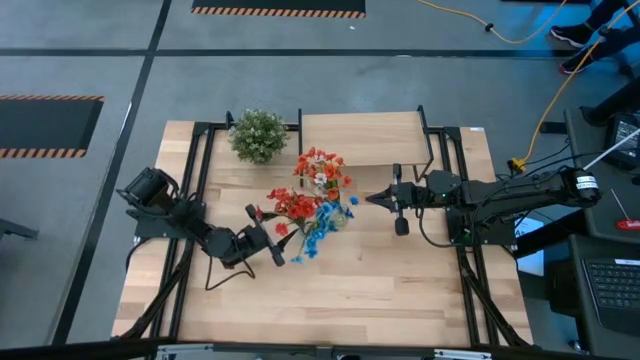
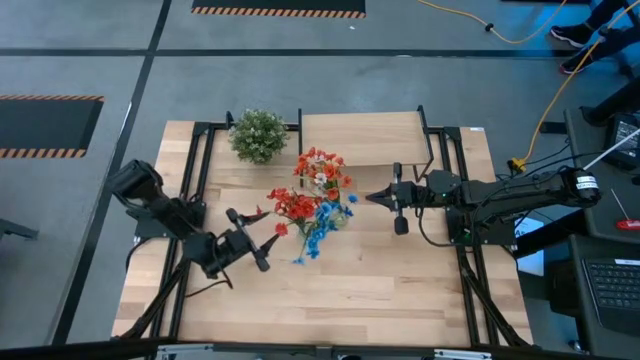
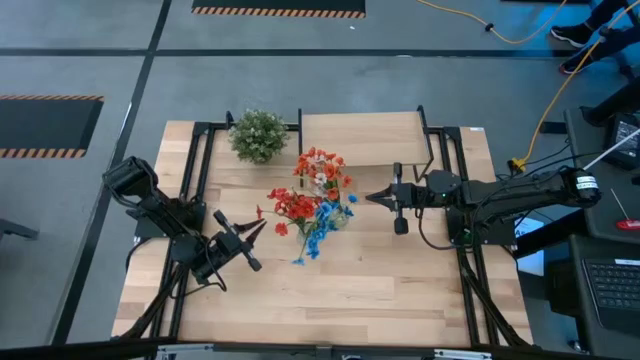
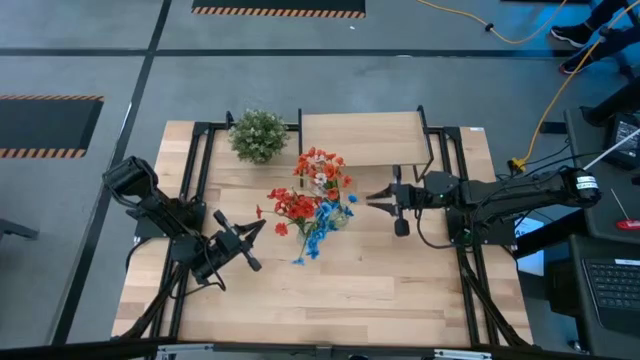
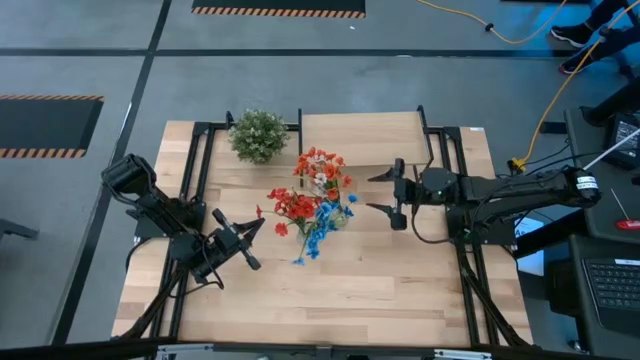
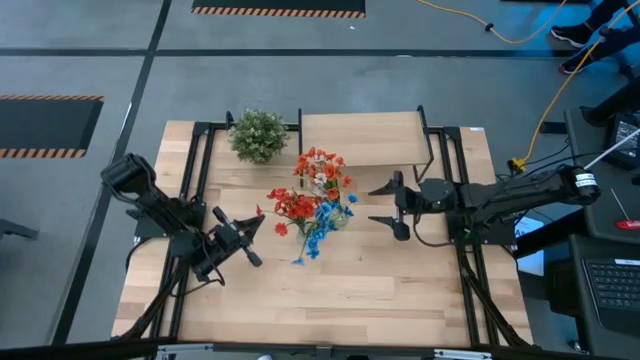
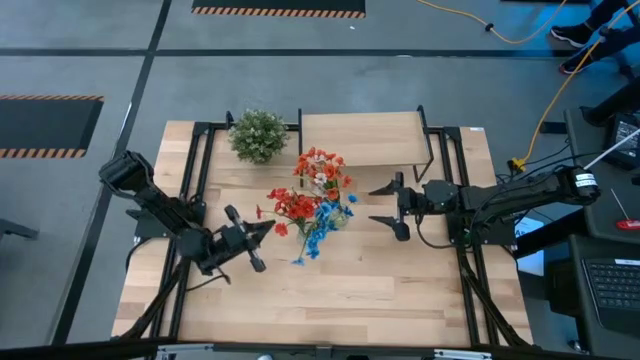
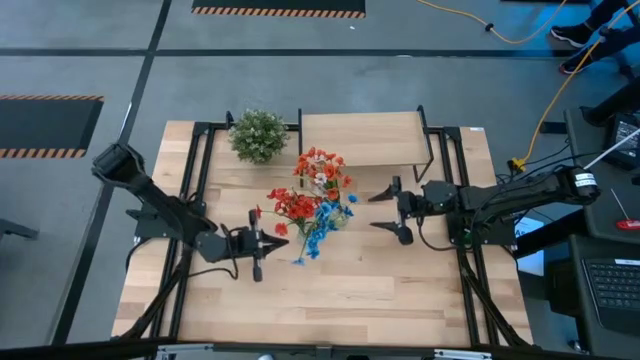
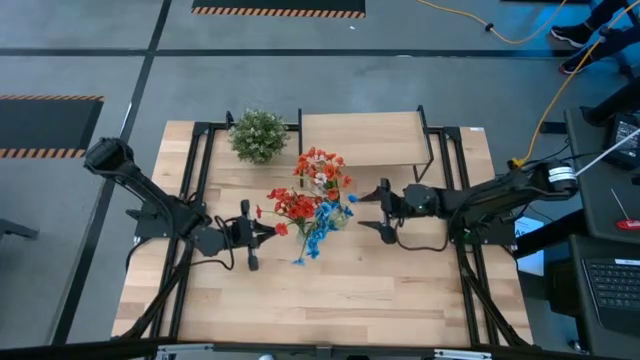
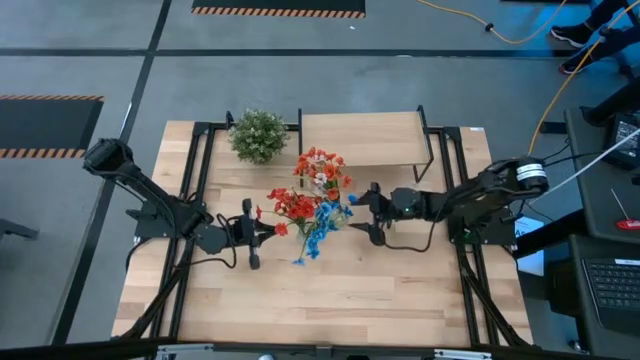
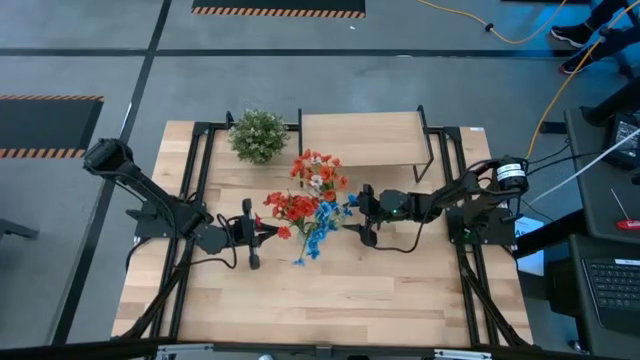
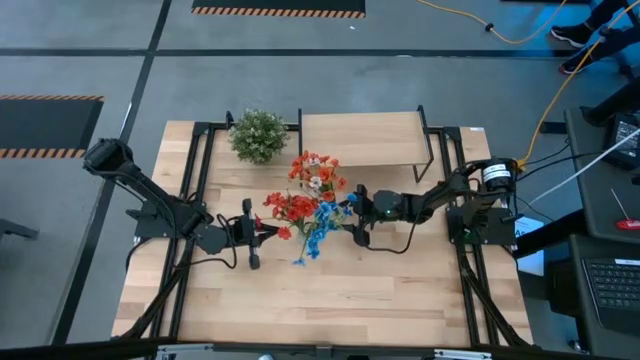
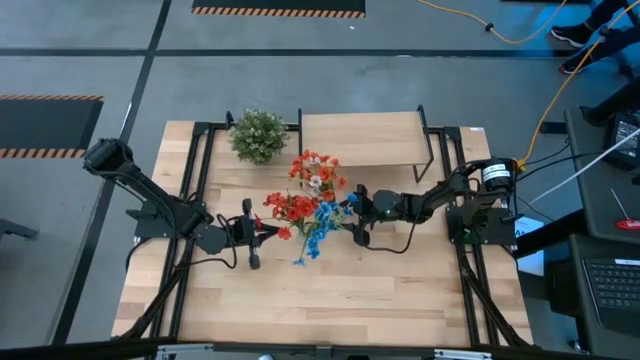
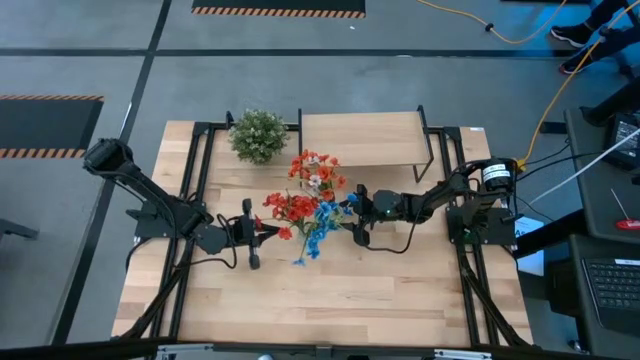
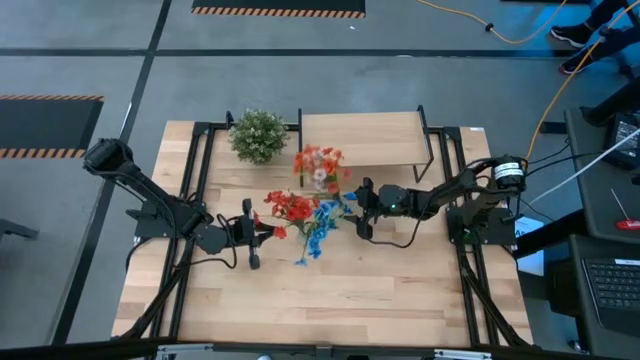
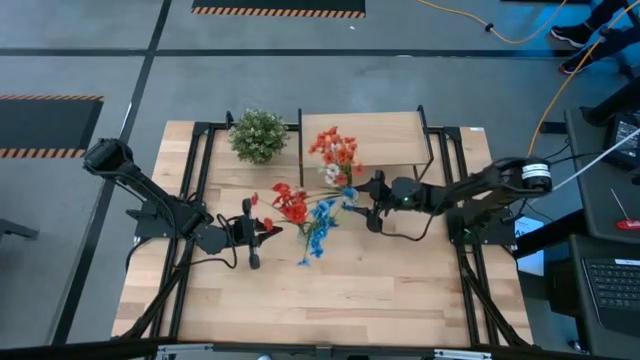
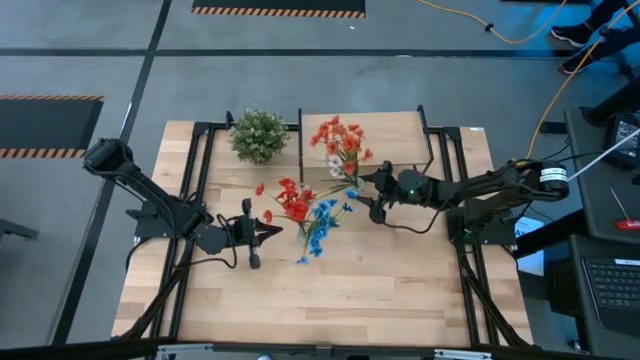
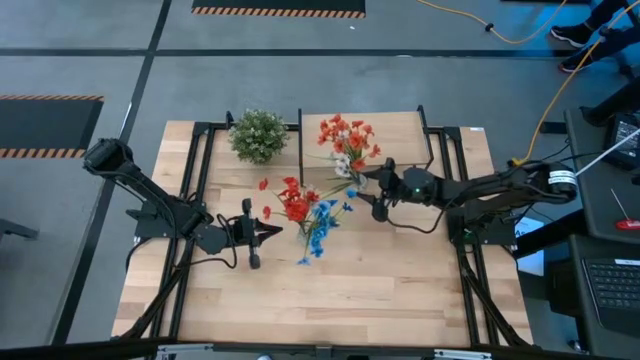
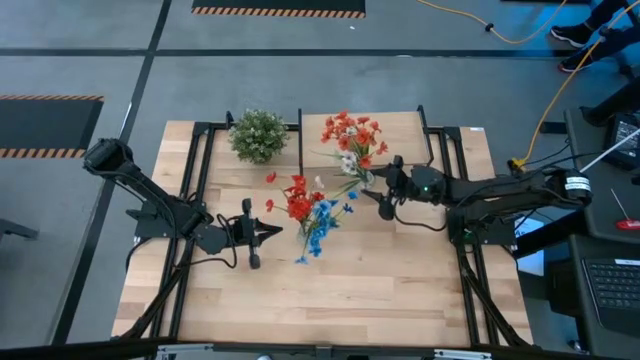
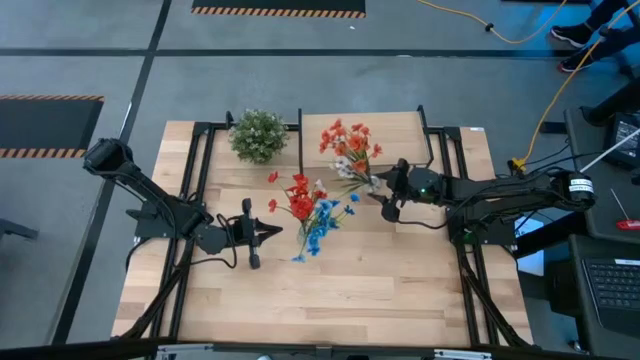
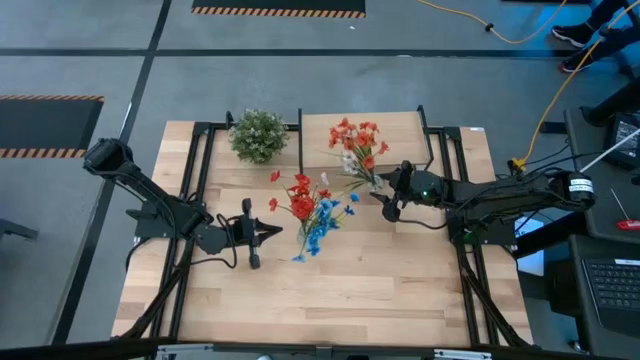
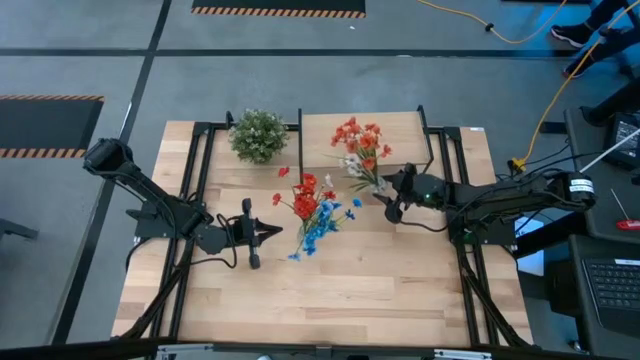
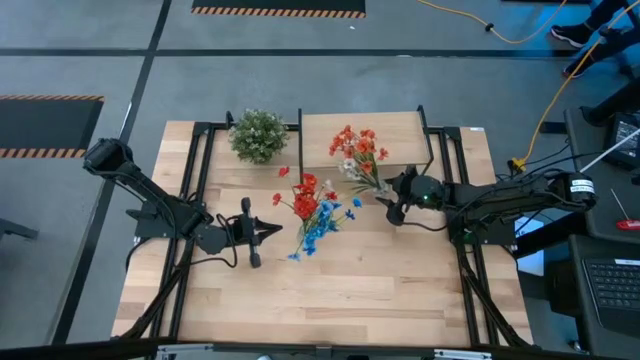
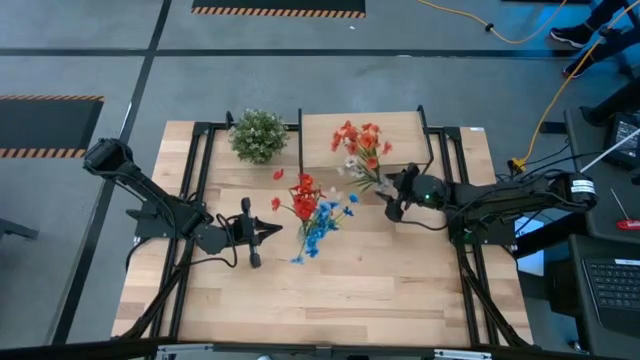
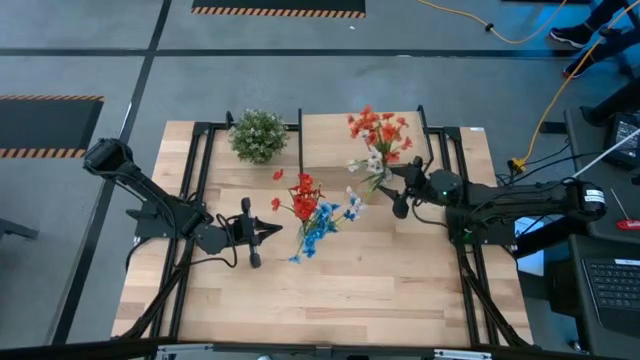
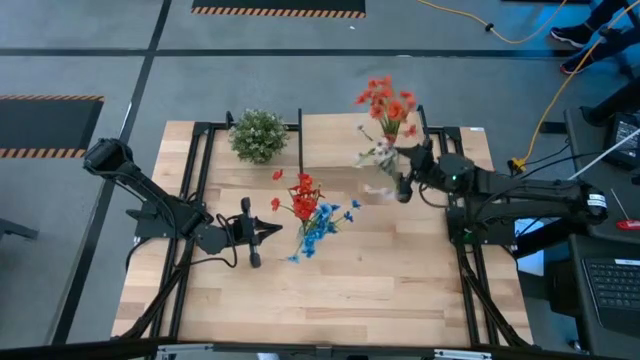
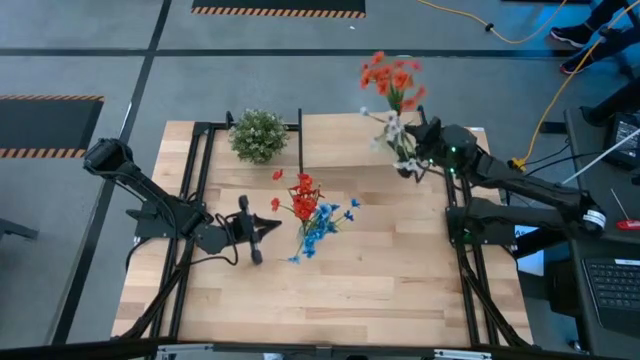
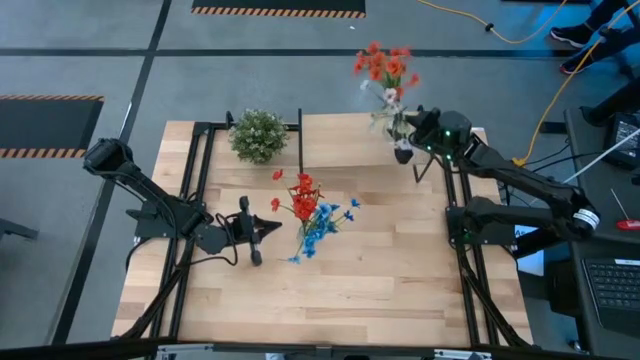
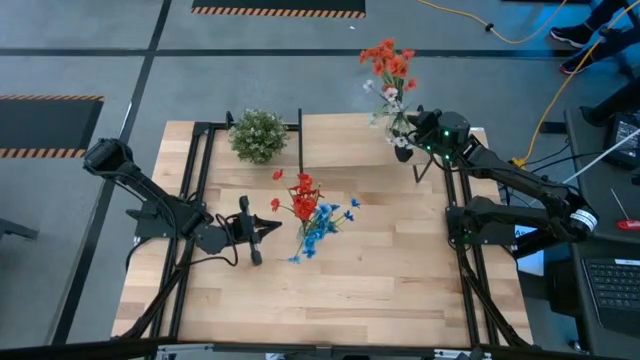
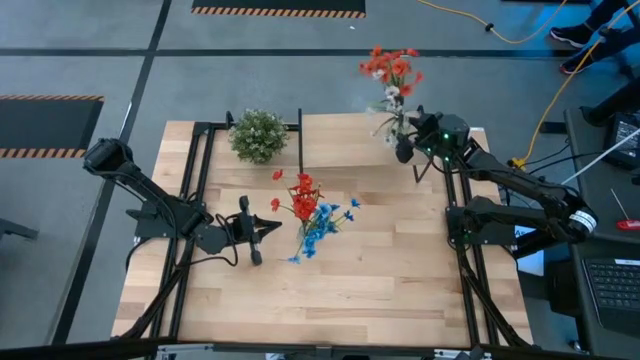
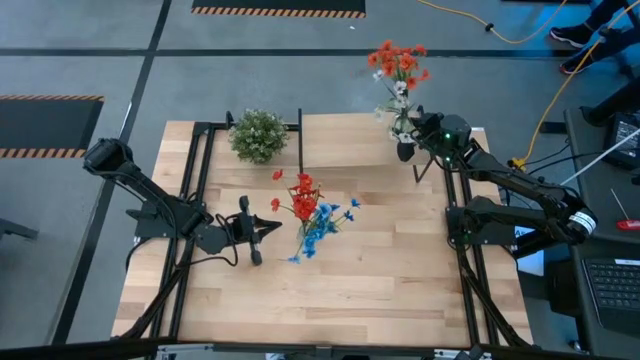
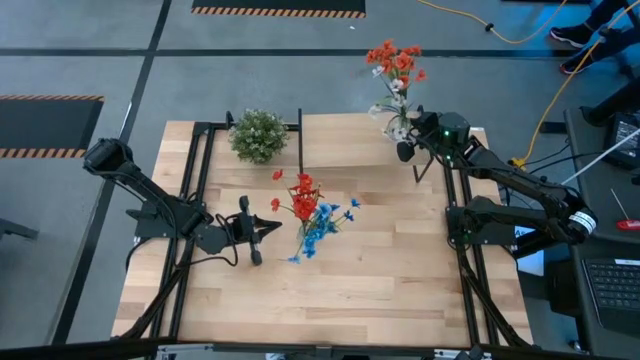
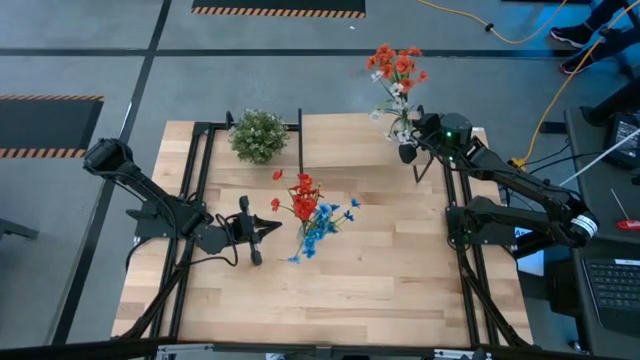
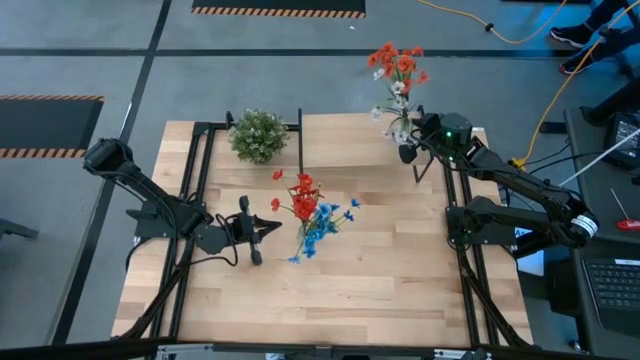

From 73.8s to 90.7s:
Task: Pick and place flowers into a vace then onto a shelf
Put the top transparent vase on the shelf

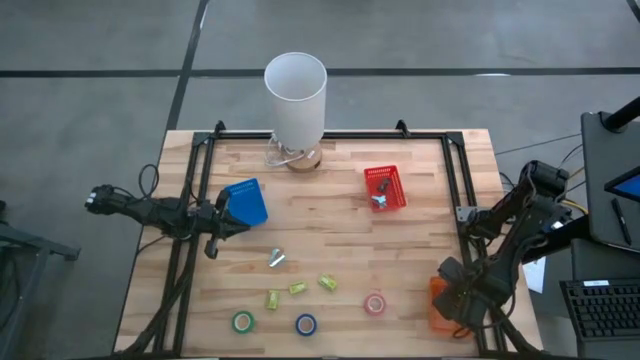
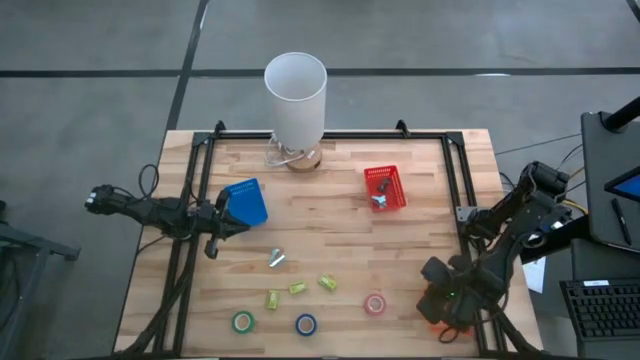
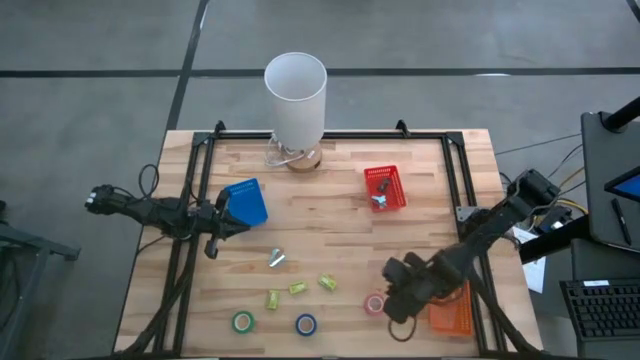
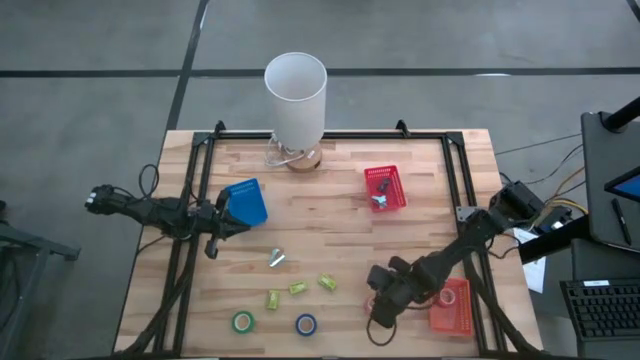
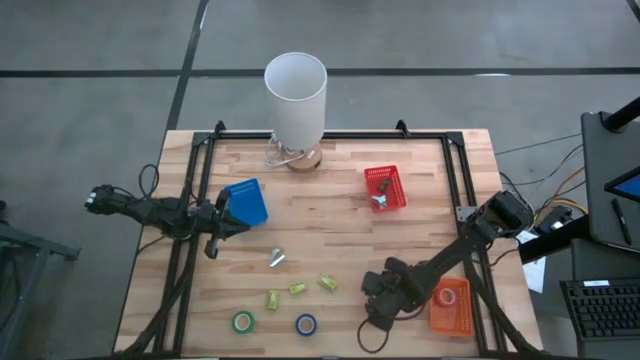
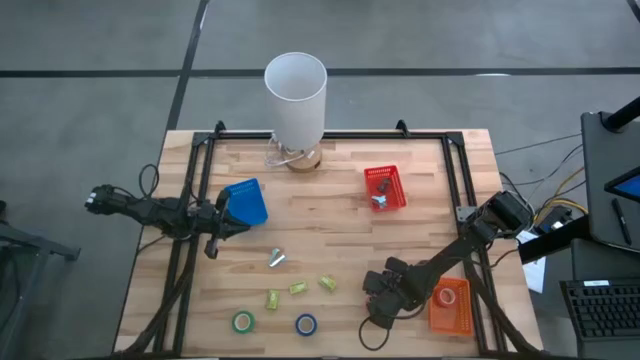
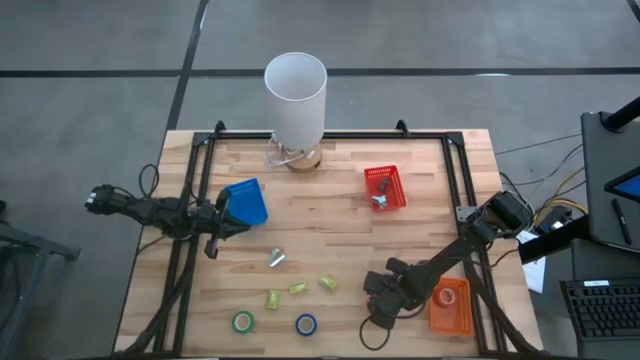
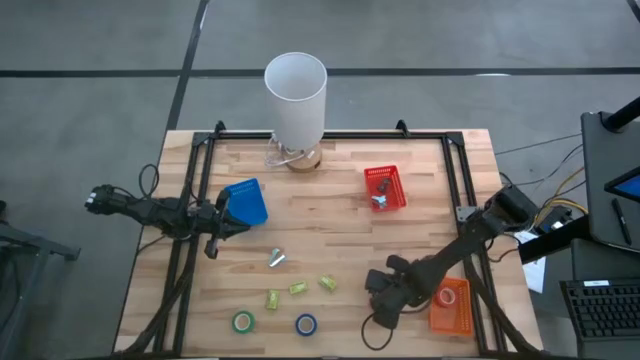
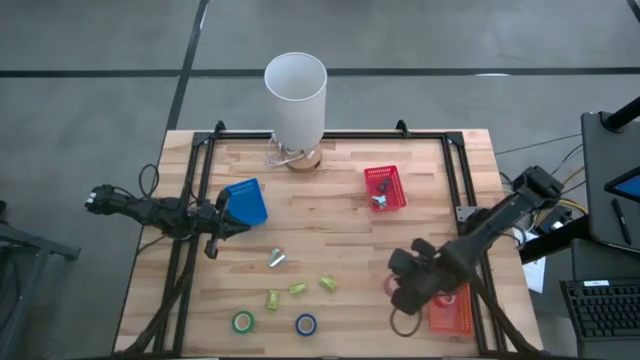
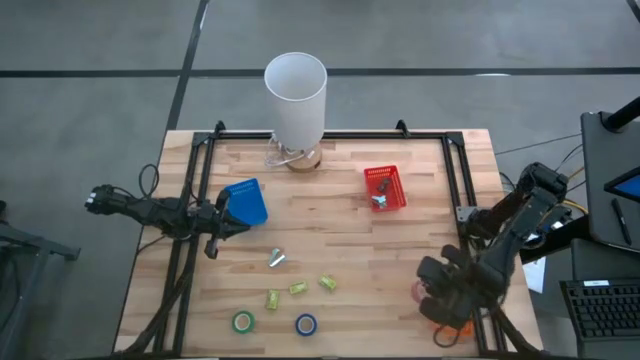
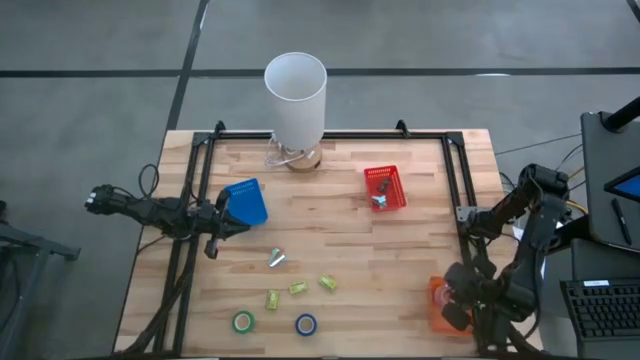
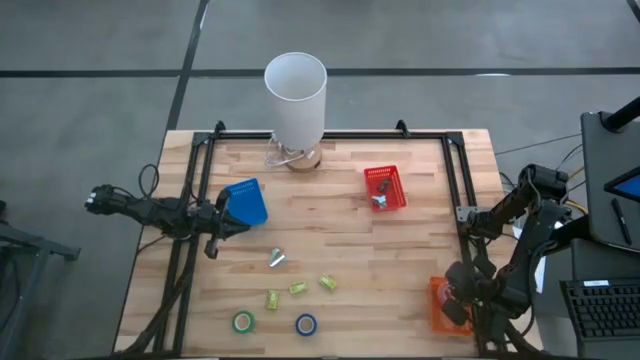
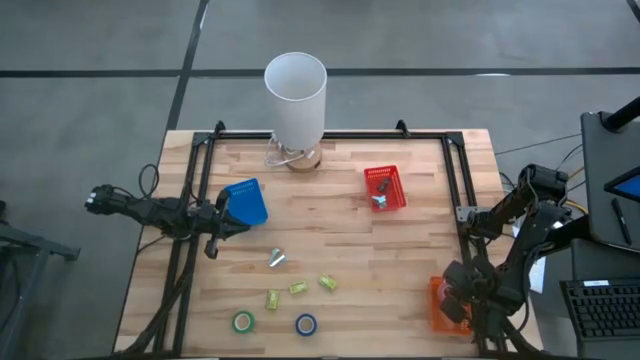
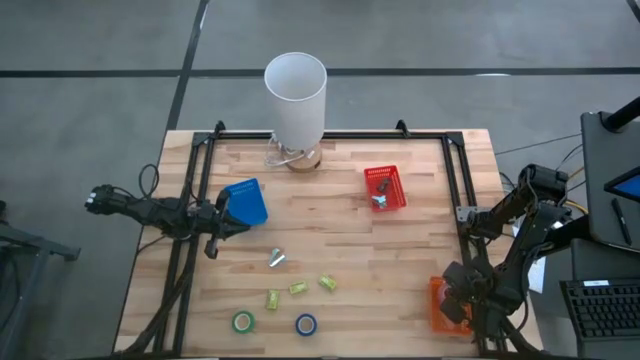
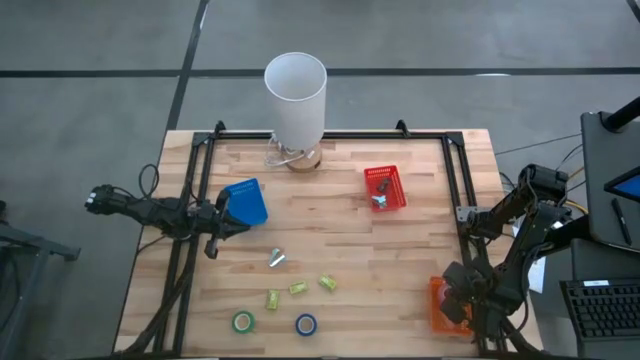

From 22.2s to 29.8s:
Task: Pick and place Stapler, Stapler remover, tape
Put the pink tape into the orange basket
